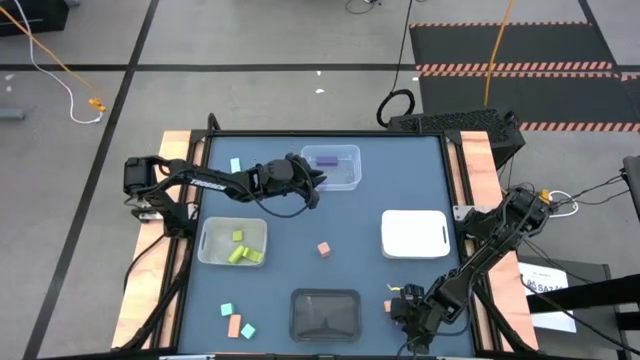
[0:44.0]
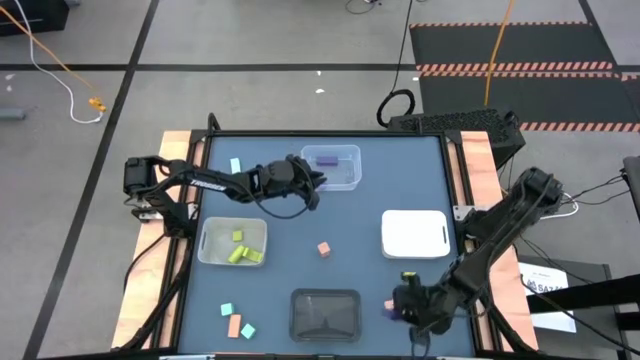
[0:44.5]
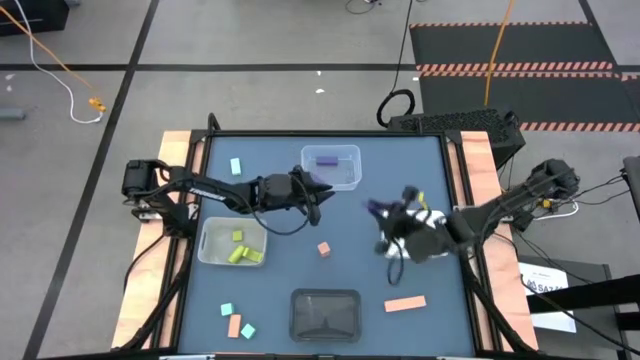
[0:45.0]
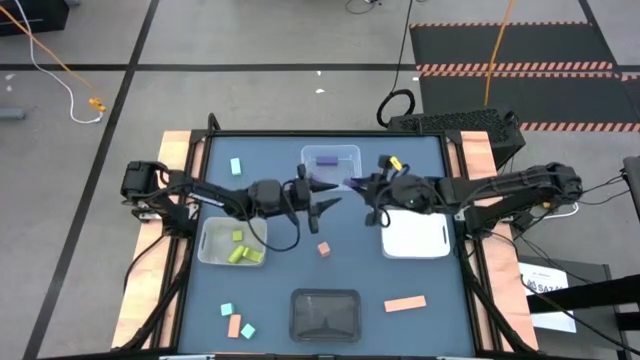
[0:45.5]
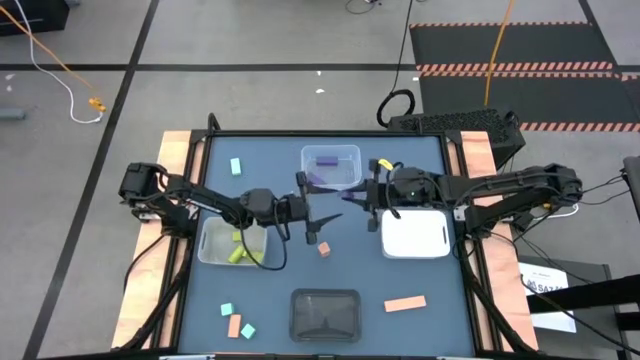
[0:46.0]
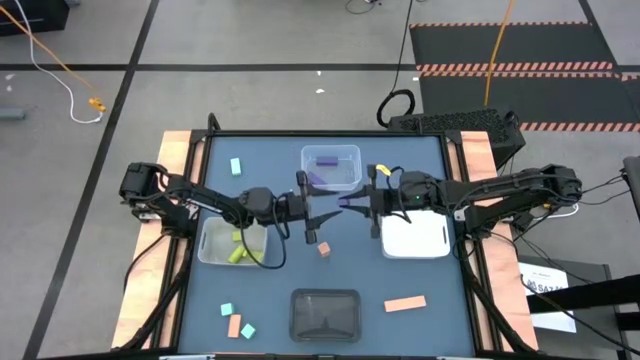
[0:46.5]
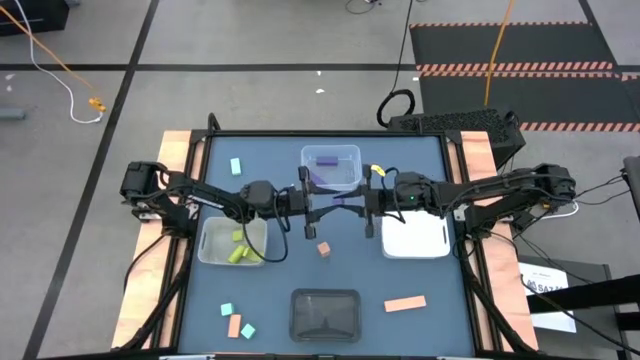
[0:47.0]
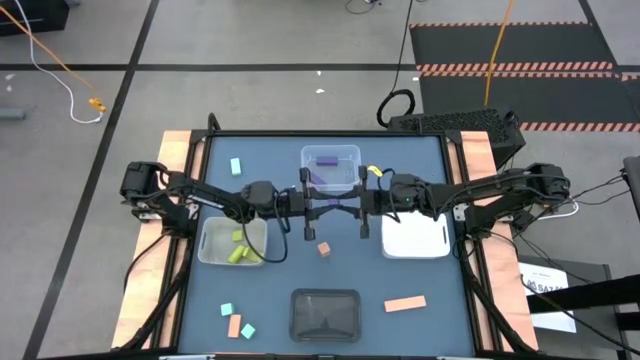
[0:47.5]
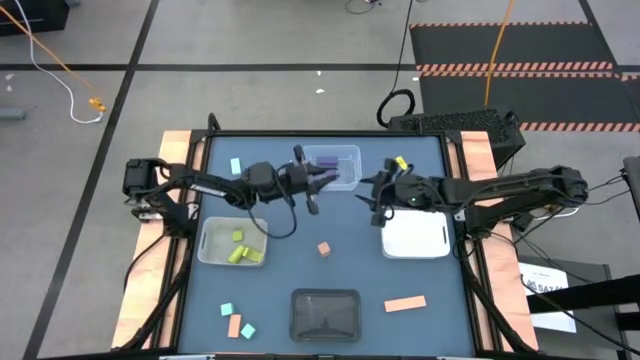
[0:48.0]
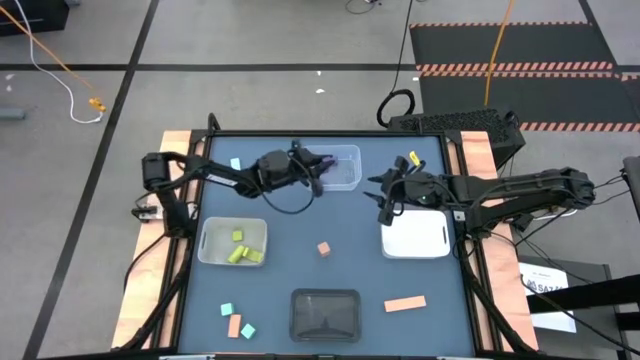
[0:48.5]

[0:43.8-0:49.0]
Task: Sort & place blocks by color
Put the purple block into the transparent bin

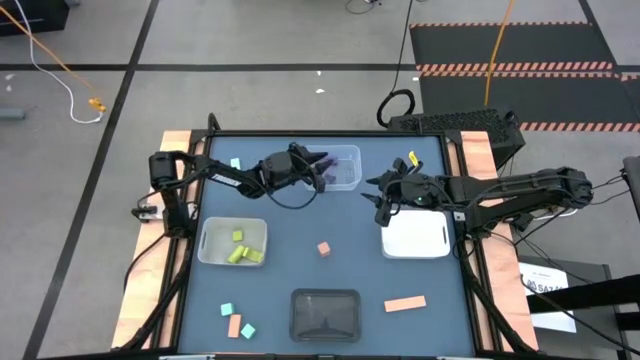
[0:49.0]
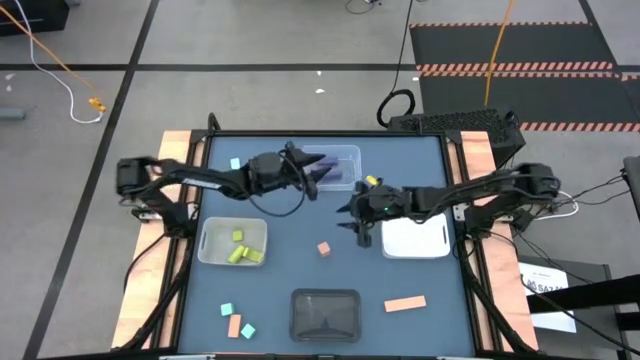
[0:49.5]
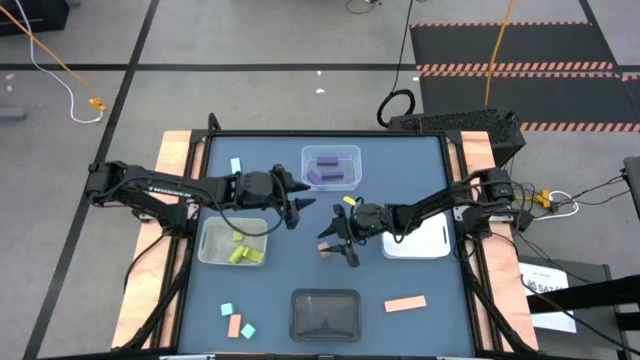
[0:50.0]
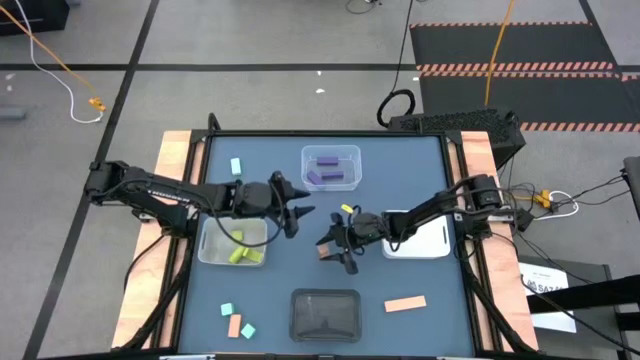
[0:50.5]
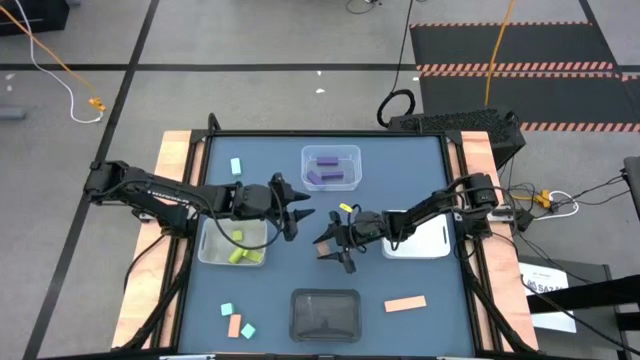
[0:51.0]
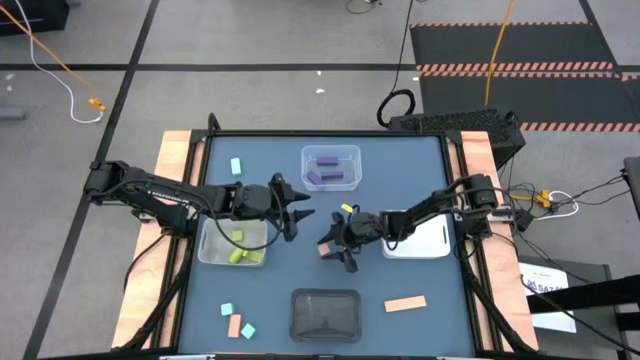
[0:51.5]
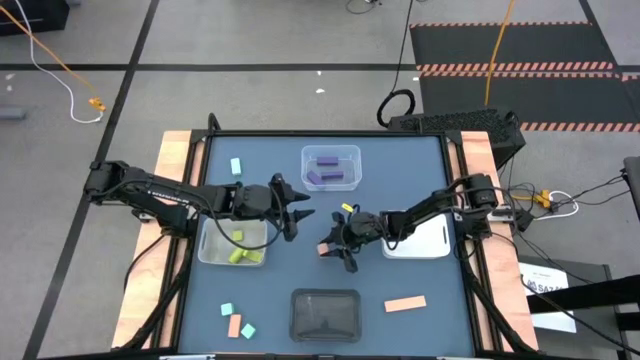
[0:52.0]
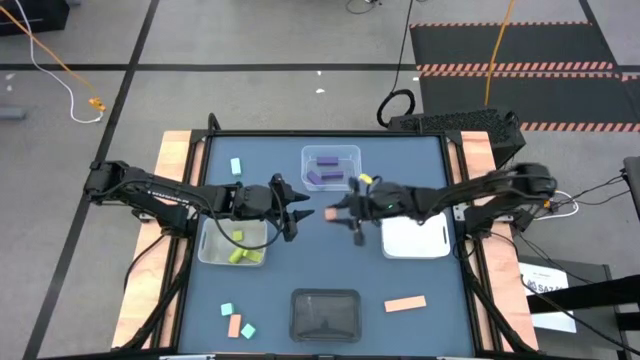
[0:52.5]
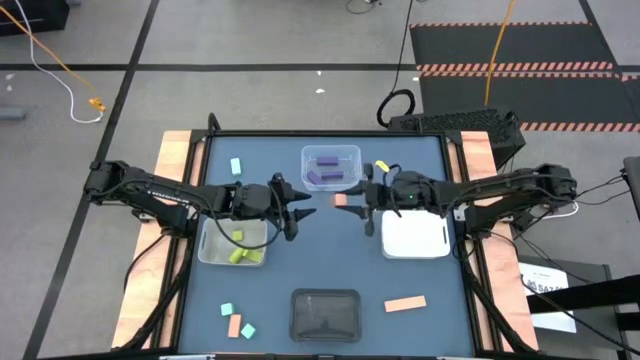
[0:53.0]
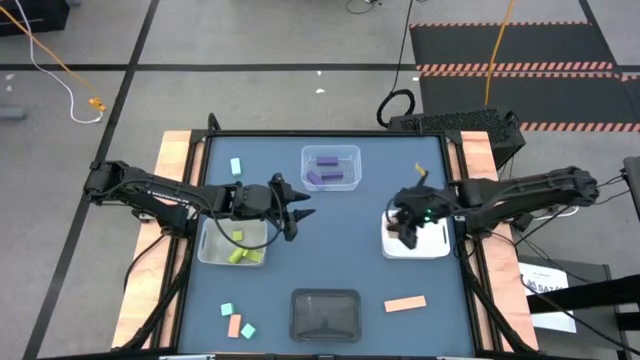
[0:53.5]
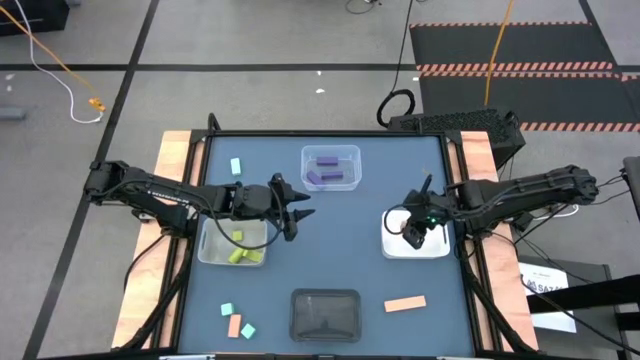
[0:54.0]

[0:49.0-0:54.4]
Put the middle brown block into the white bin

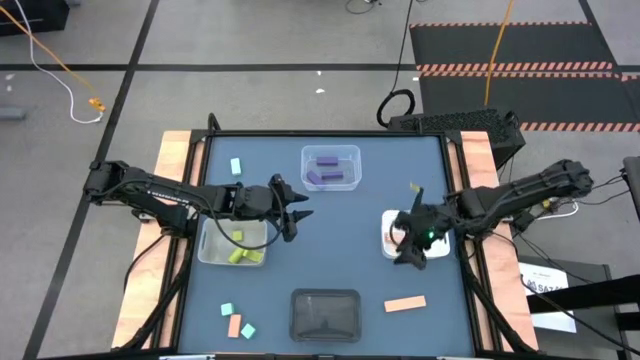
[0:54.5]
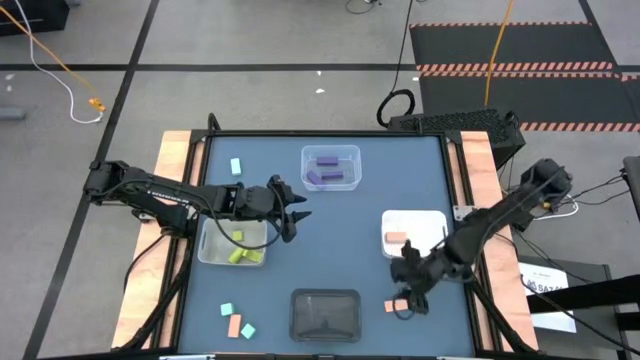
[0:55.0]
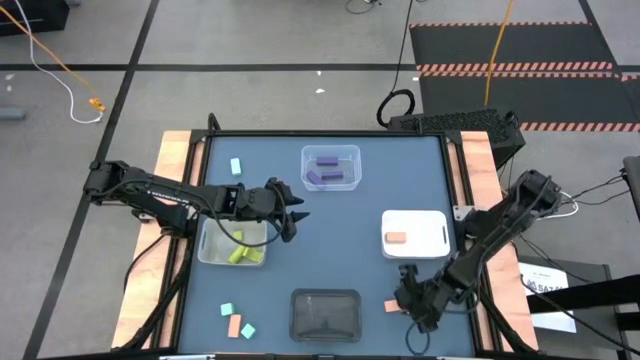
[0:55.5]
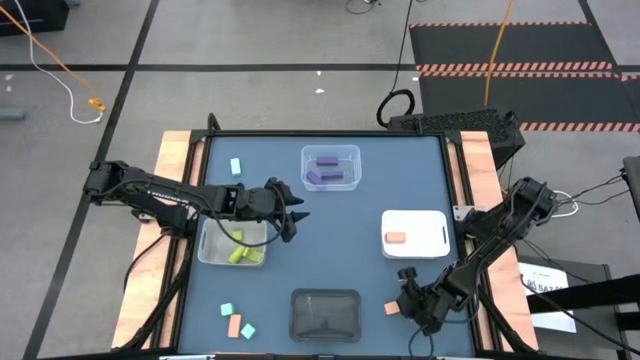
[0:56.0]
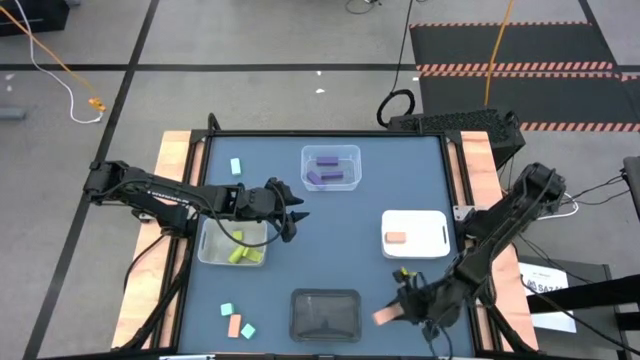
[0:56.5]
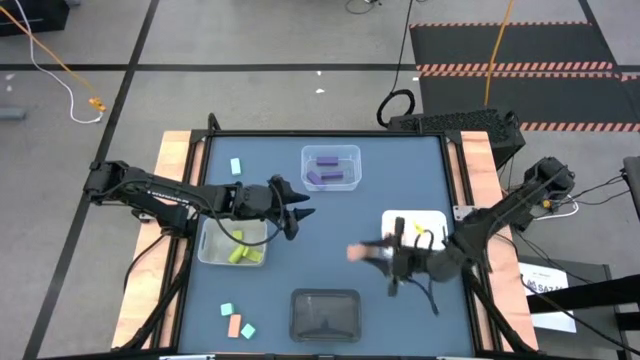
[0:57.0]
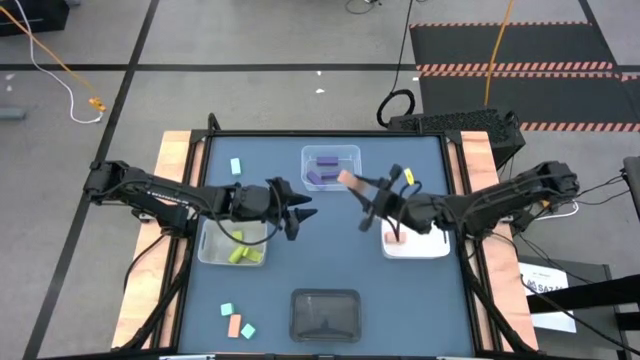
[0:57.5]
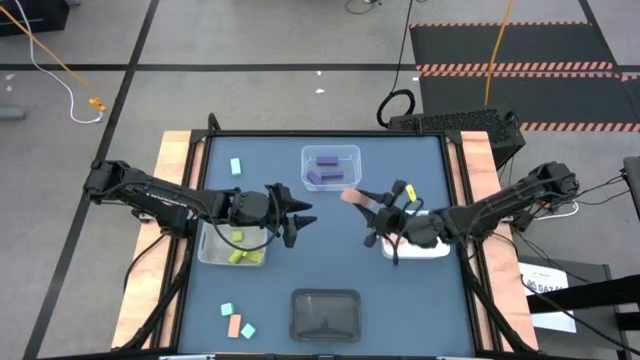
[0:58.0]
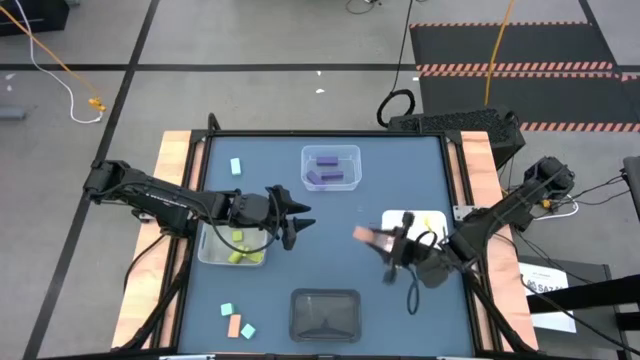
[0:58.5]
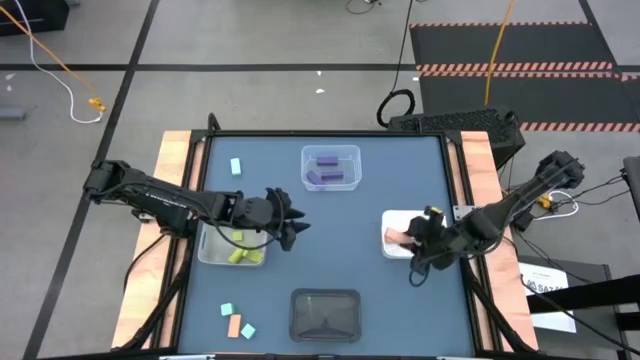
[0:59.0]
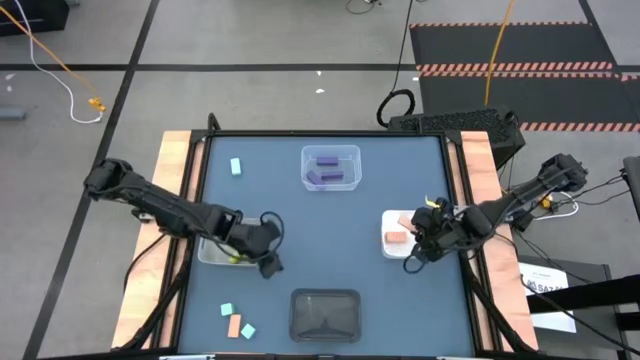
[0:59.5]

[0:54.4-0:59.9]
Put the right brown block into the white bin

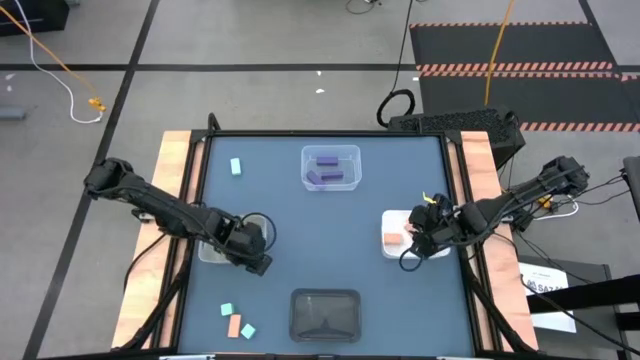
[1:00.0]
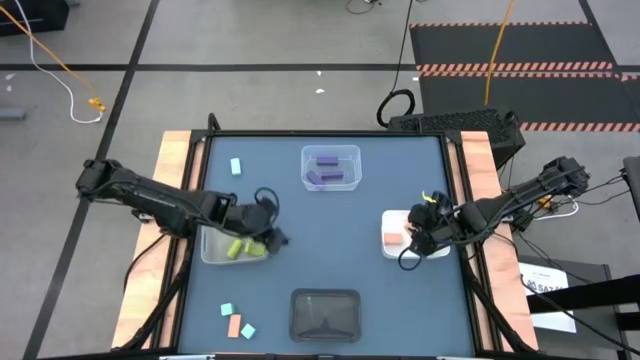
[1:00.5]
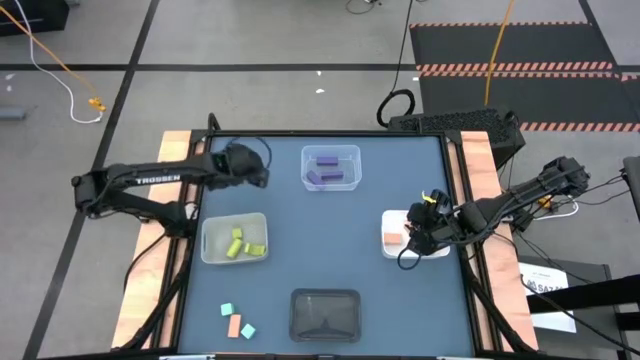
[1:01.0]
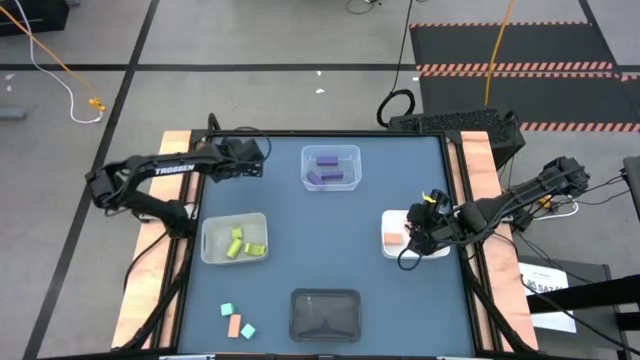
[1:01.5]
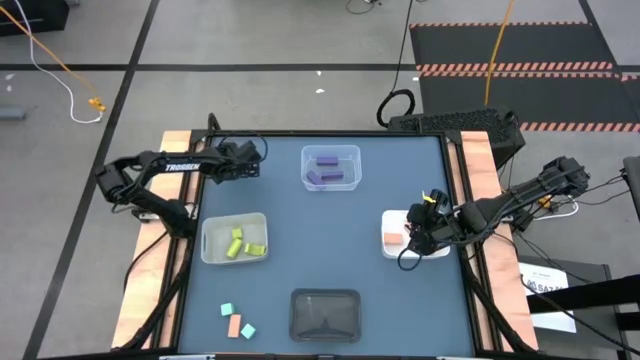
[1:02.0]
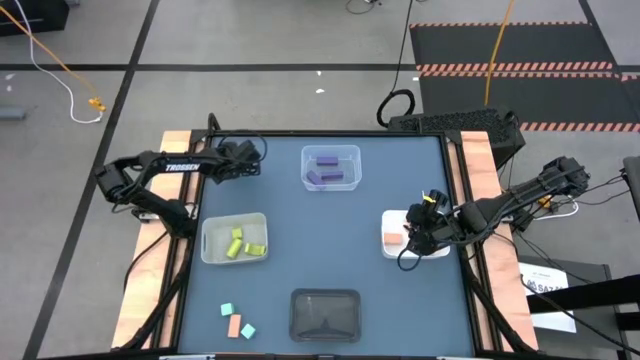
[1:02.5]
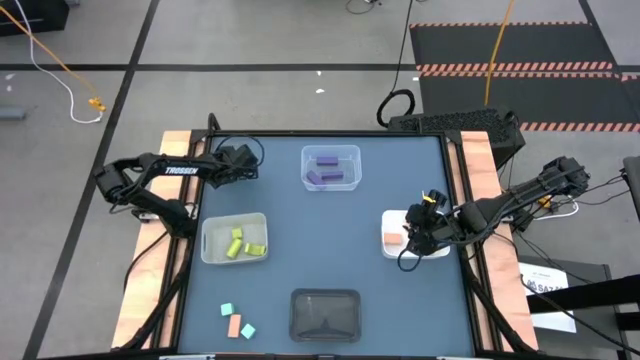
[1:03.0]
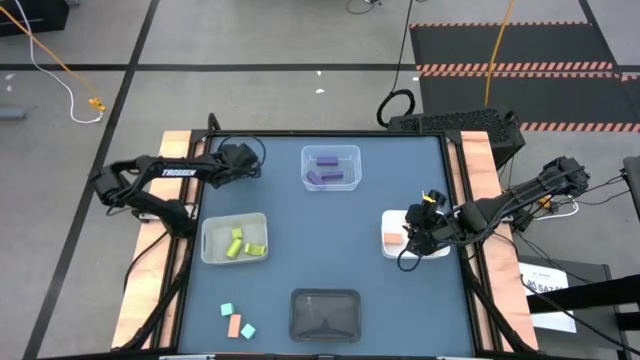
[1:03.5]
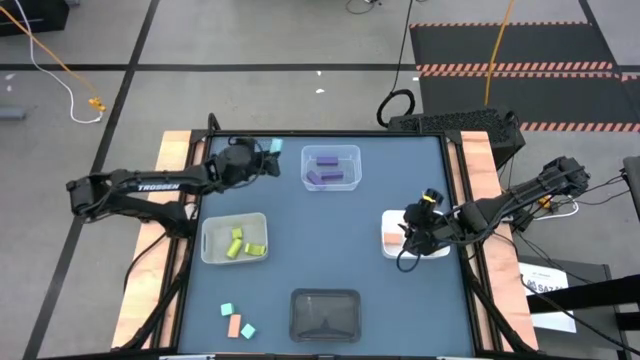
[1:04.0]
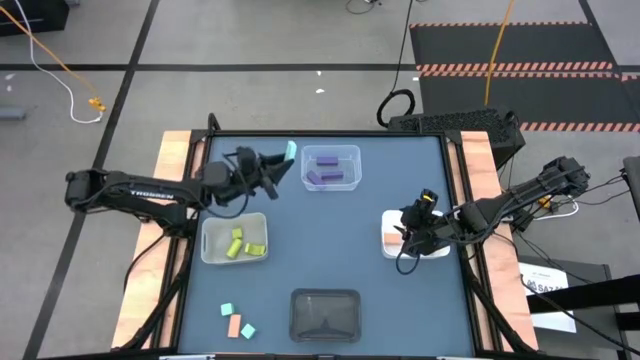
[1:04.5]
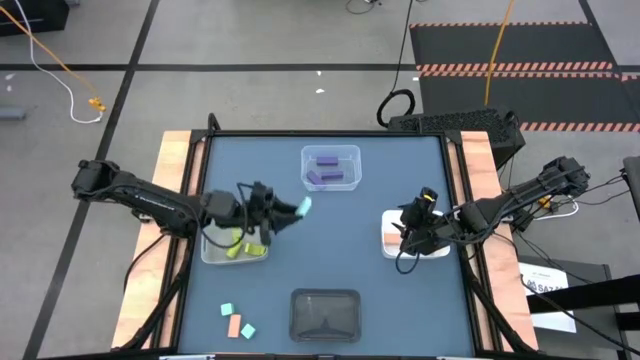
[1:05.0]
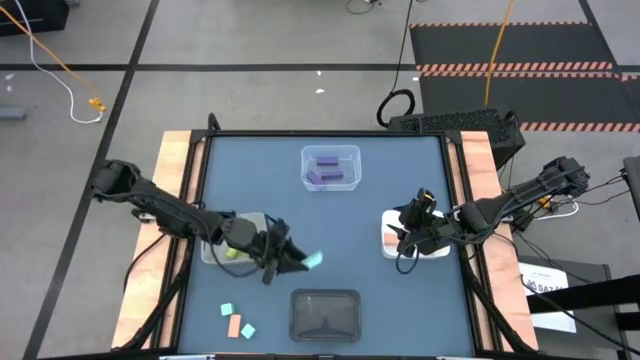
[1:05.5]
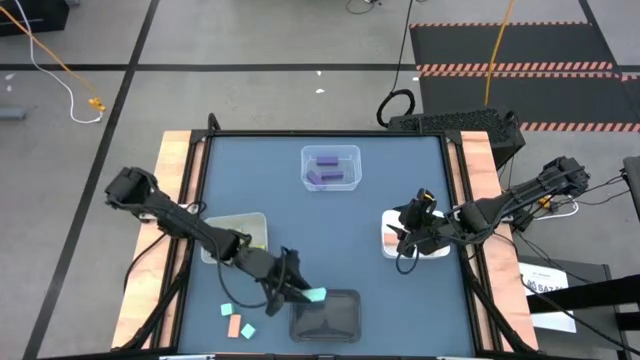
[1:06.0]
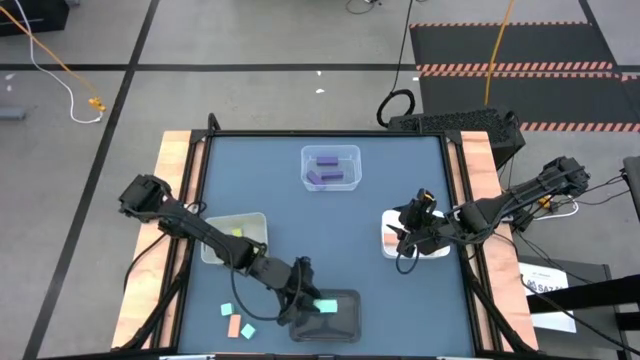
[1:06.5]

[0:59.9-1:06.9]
Put the top left light blue block into the black bin
